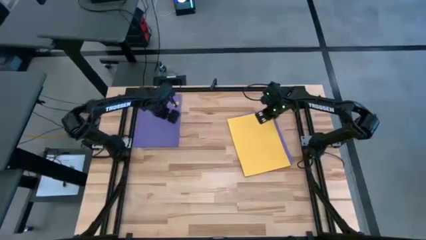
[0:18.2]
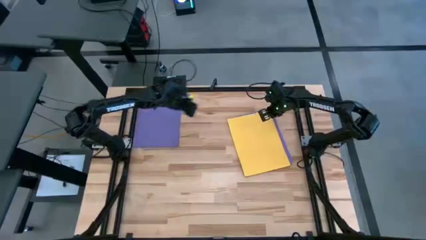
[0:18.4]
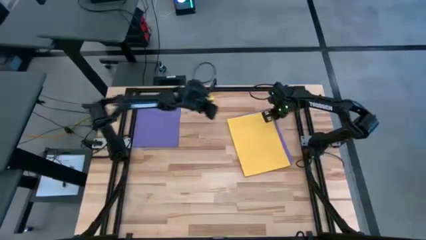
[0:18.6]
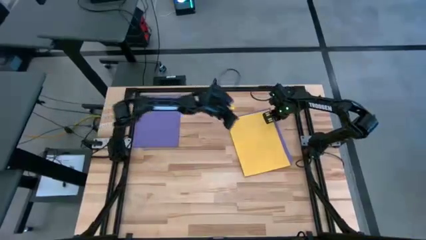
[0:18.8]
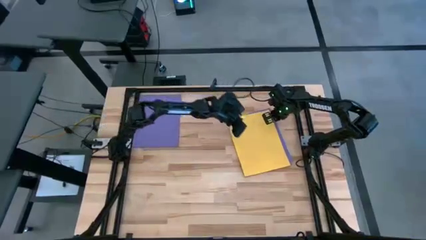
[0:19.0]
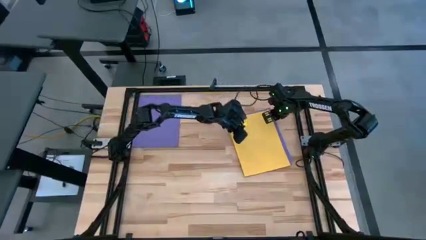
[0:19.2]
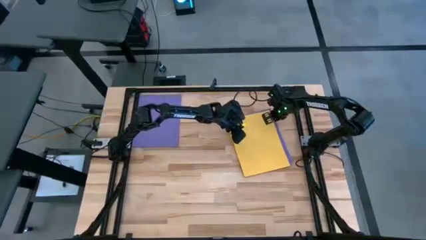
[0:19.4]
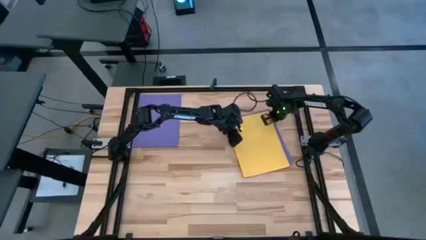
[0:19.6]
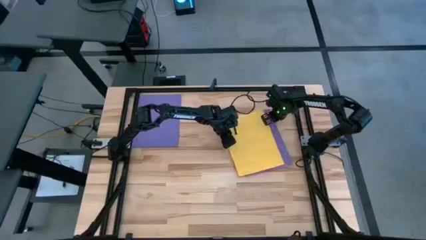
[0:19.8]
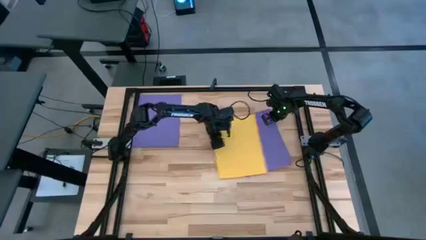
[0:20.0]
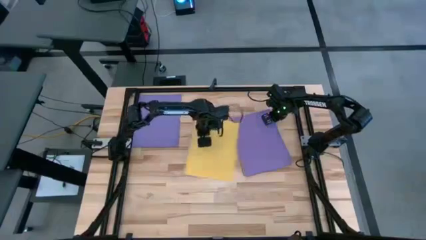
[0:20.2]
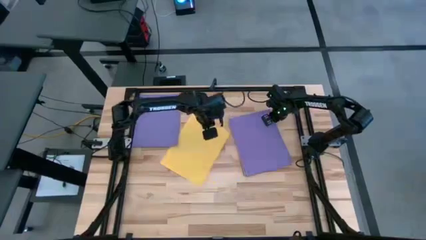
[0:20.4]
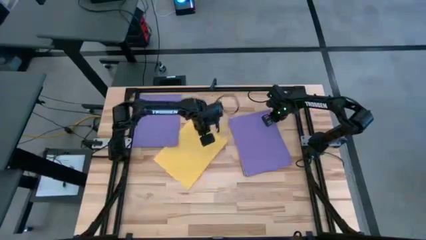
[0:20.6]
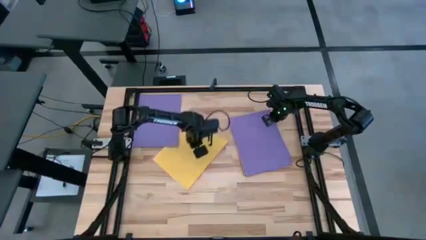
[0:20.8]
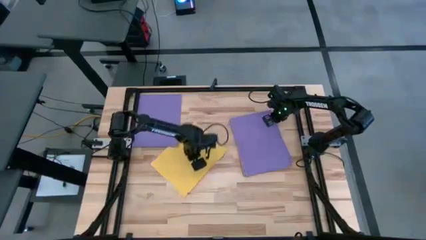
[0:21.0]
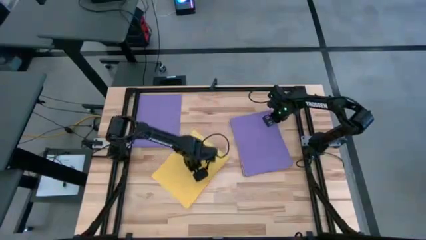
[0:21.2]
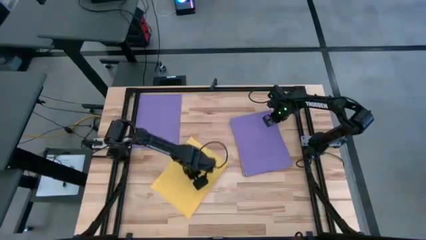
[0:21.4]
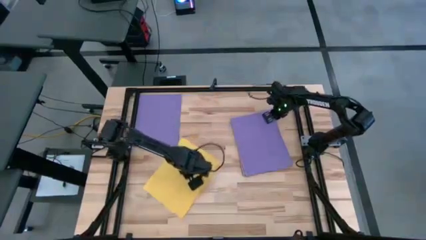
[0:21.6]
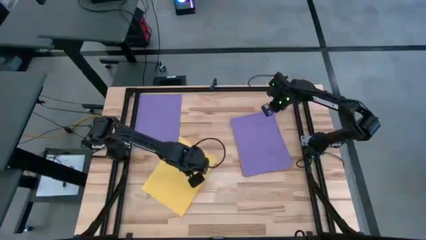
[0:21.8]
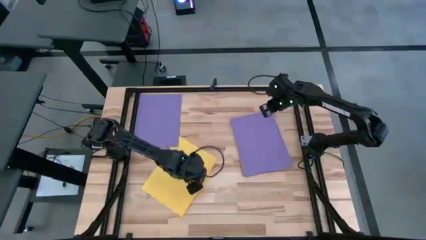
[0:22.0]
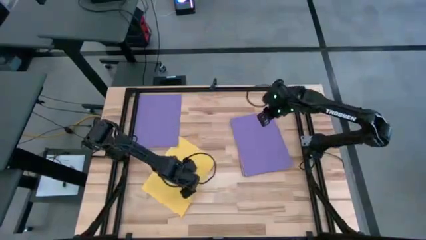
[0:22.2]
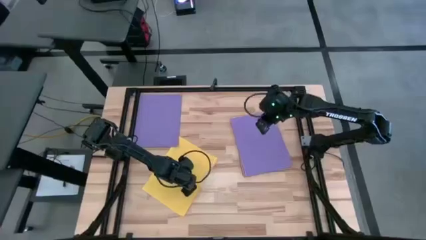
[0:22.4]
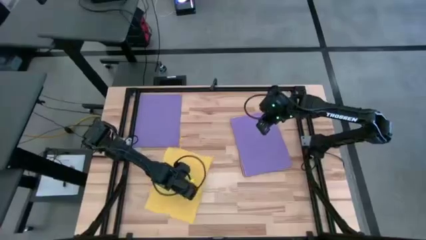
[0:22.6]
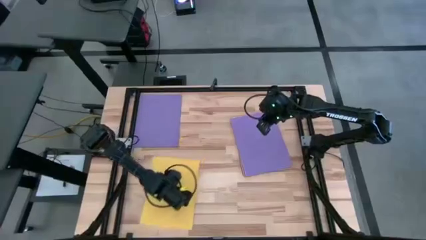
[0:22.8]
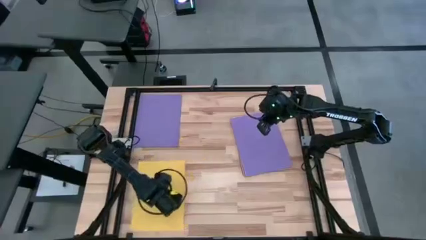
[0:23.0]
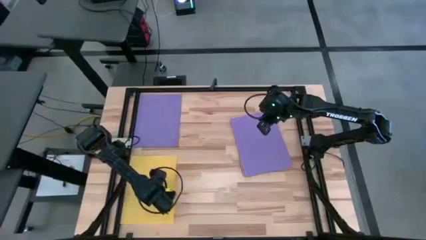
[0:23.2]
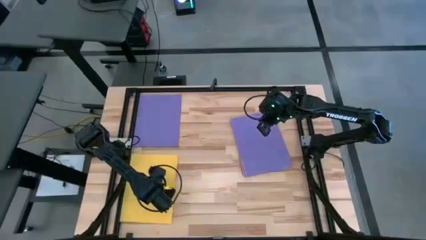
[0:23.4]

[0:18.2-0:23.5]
Task: Organize paper
Move the yellow paper to the bottom left of the table

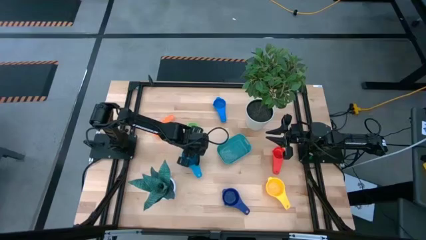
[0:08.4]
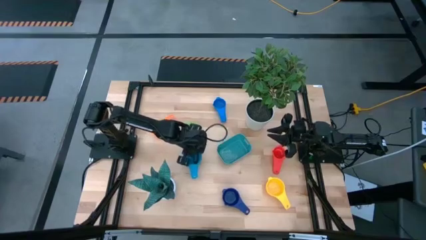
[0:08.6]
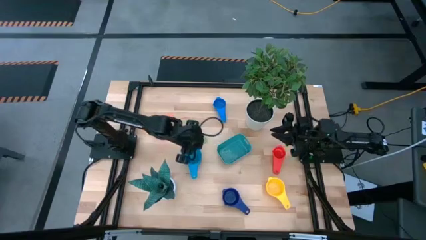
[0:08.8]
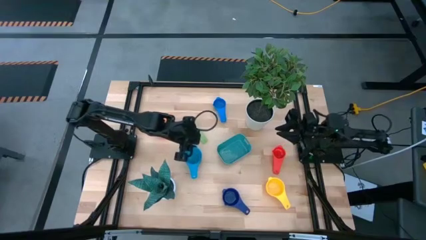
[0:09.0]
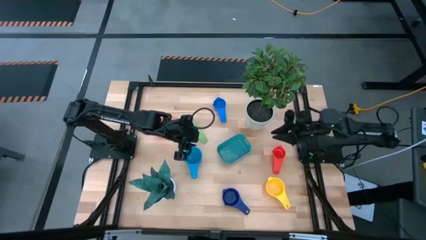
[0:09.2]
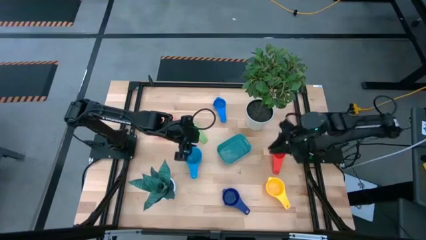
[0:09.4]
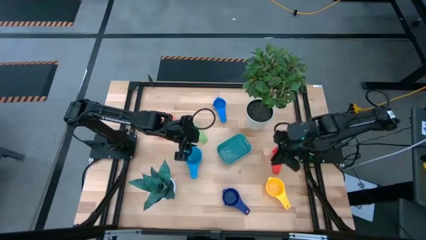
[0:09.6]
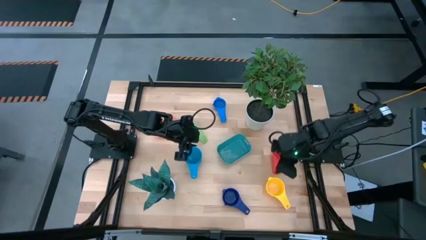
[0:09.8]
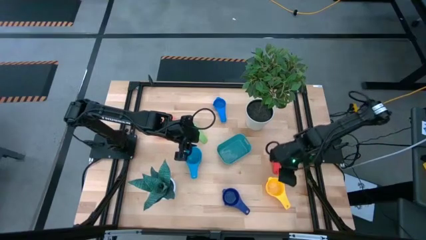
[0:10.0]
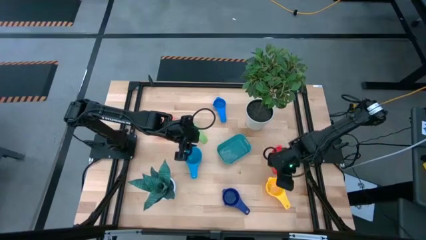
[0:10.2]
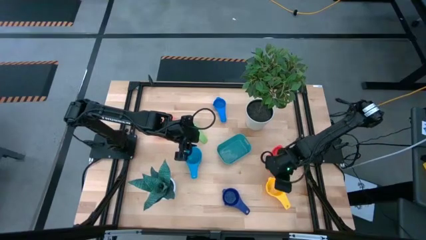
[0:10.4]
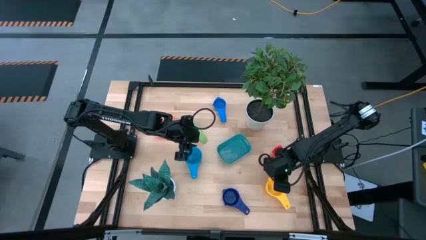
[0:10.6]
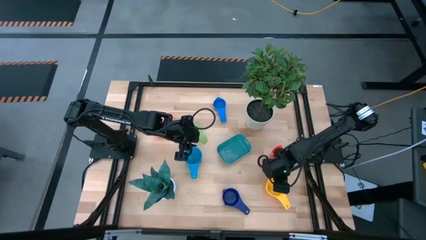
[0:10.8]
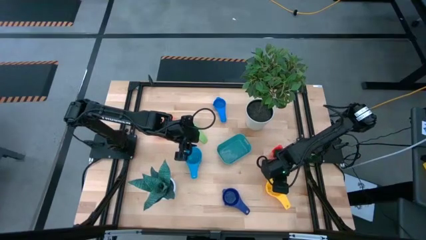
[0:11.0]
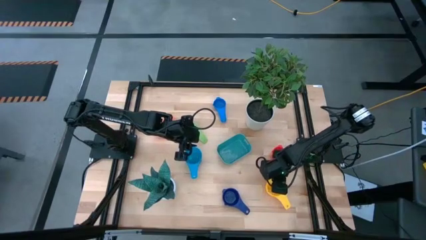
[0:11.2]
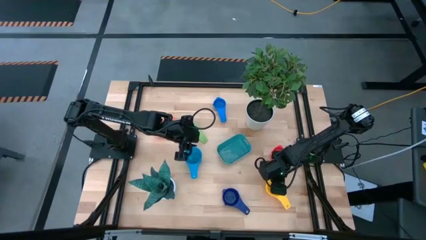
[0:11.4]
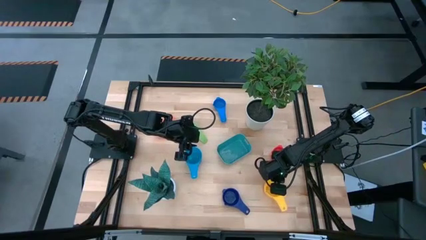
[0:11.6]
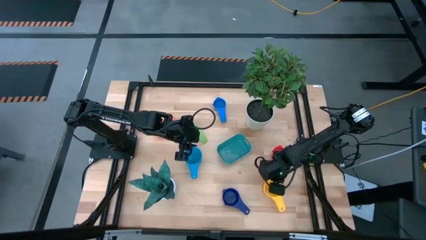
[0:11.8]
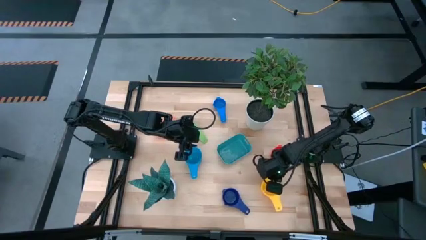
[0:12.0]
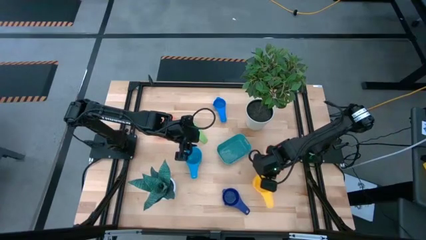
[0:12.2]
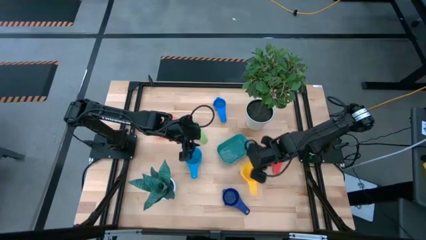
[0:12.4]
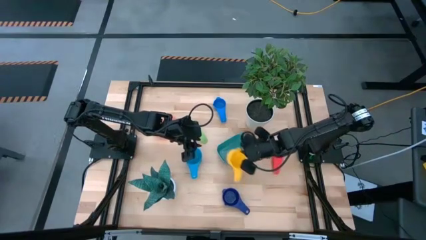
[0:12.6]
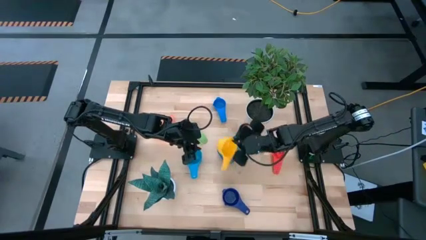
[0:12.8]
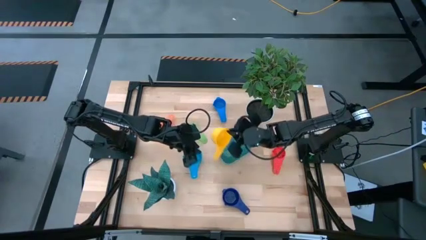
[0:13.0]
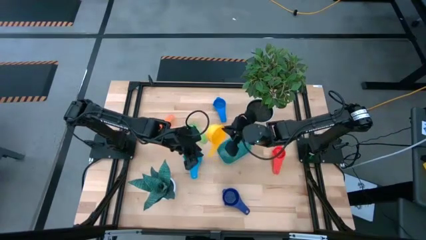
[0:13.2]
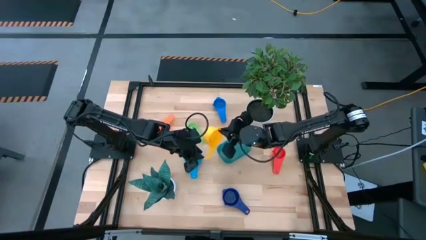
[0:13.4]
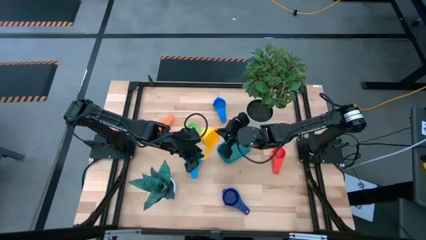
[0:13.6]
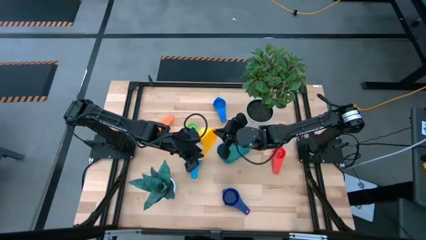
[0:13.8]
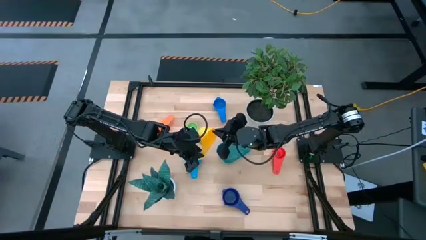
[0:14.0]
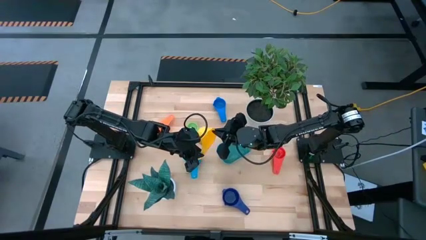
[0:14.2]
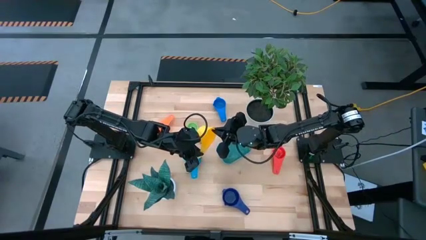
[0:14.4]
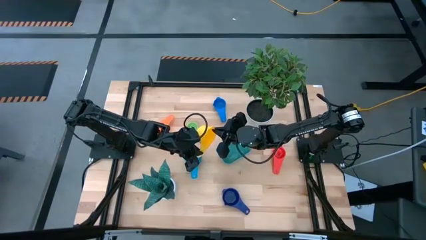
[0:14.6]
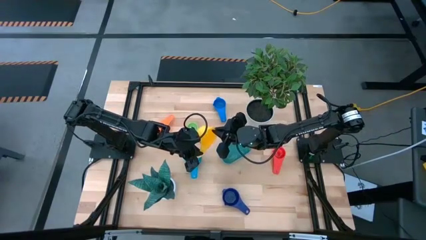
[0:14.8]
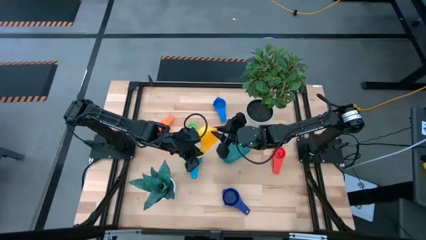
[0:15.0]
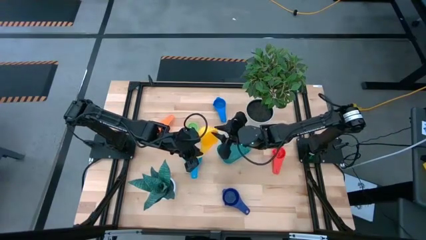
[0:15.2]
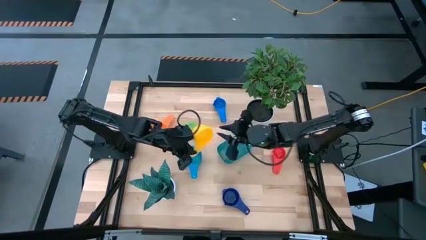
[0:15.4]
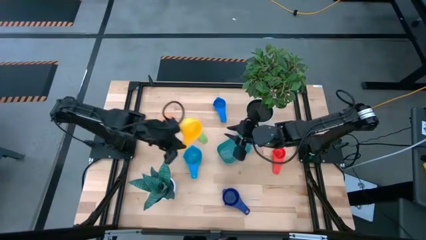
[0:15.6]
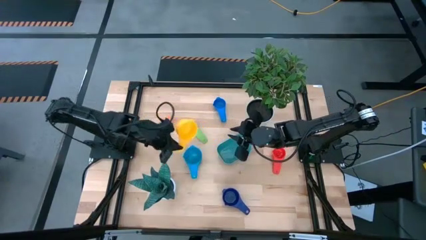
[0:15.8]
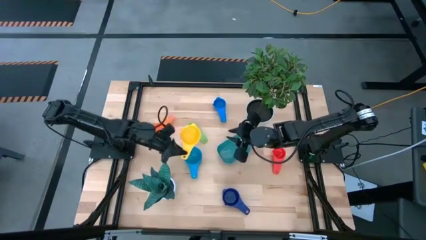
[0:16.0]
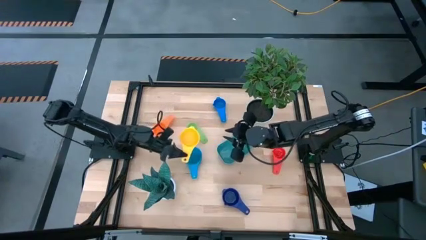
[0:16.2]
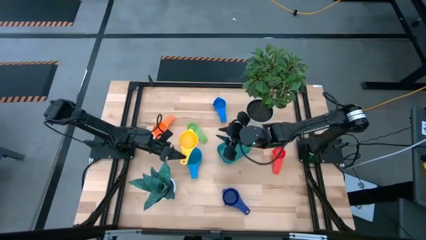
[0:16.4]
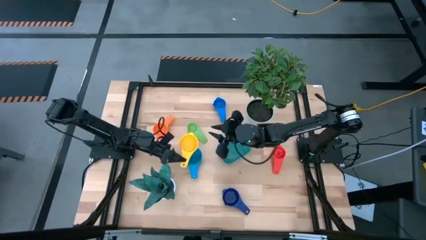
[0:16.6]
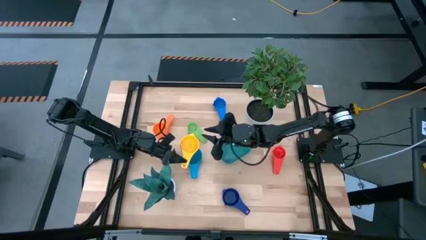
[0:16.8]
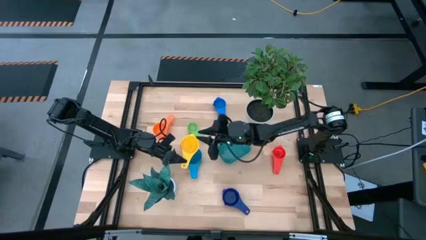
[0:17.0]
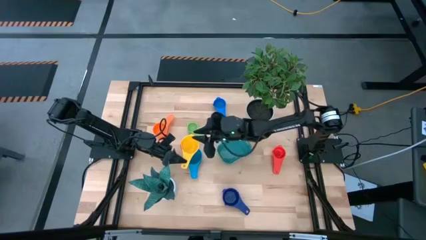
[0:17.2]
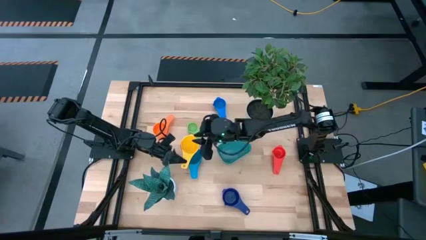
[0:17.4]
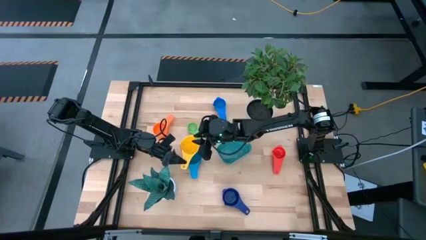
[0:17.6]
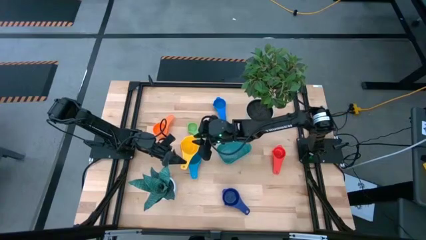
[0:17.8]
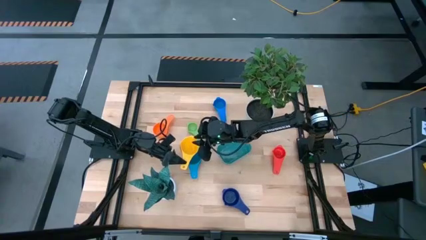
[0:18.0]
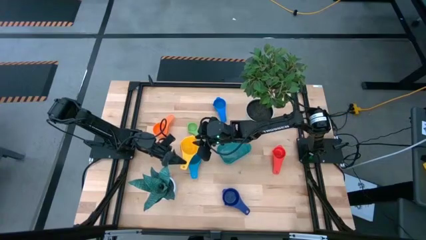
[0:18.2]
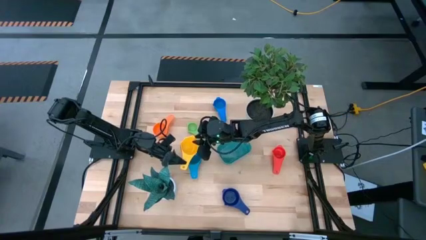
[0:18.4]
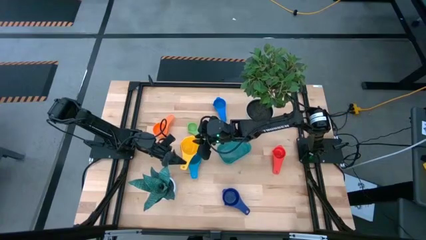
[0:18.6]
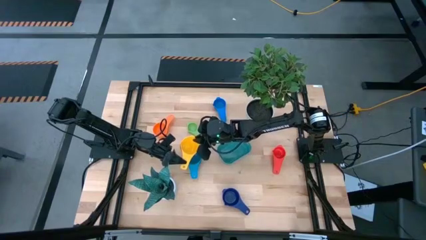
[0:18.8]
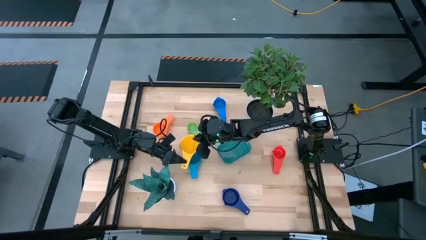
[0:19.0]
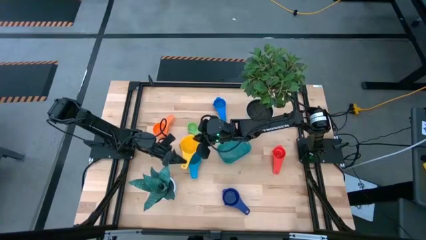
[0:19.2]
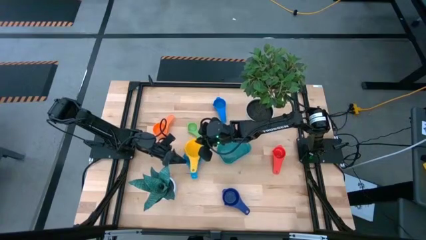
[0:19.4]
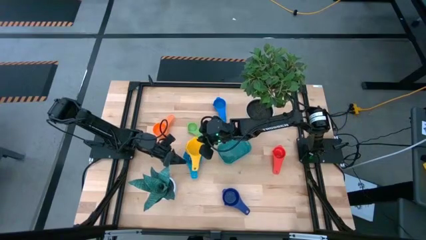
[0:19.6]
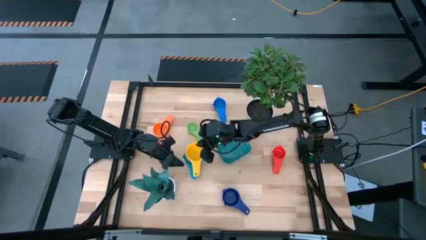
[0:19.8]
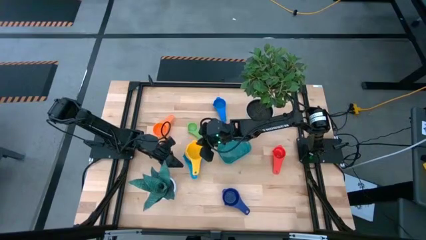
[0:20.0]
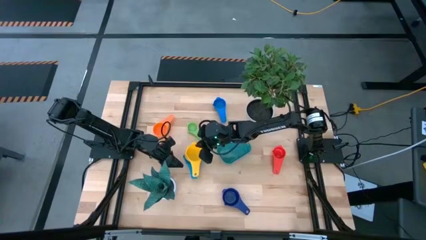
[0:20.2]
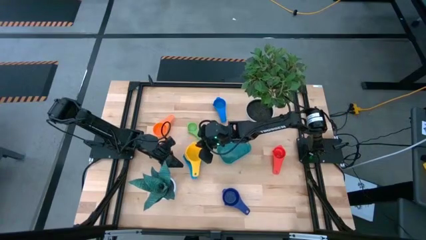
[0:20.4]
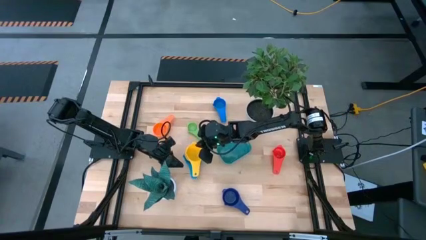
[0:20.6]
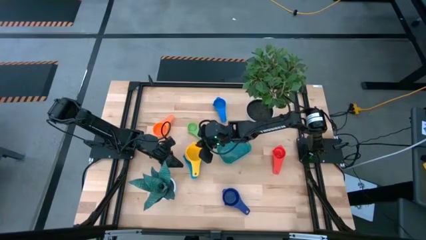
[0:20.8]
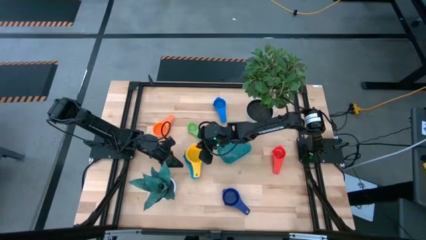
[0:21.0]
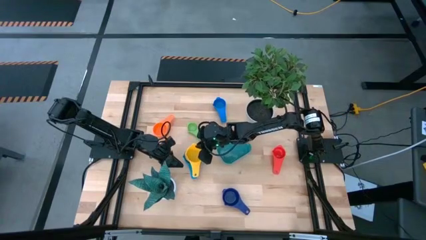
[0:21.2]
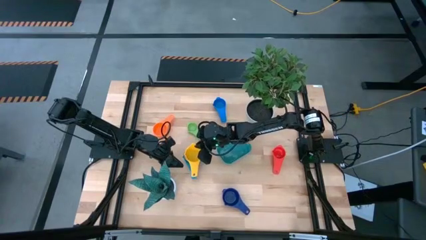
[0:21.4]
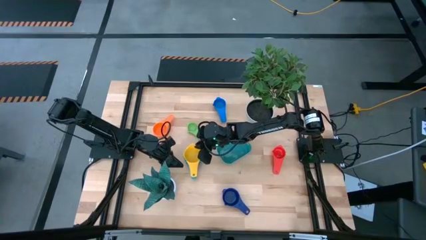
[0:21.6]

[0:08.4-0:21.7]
Task: Nest measuring cups in basket
Stack the yellow measuring cup on top of the light blue measuring cup
